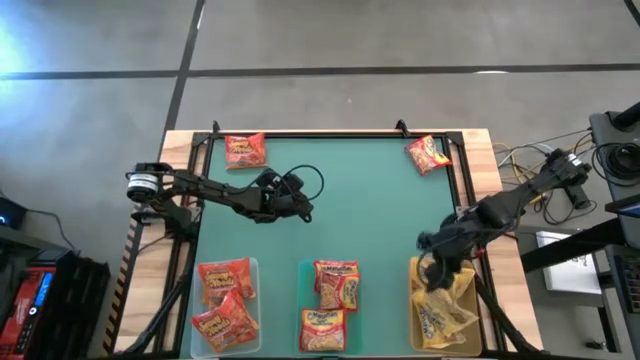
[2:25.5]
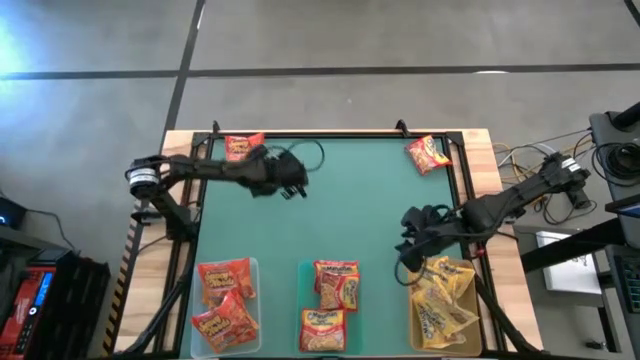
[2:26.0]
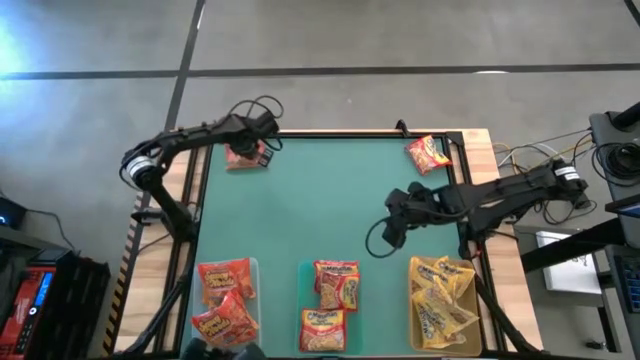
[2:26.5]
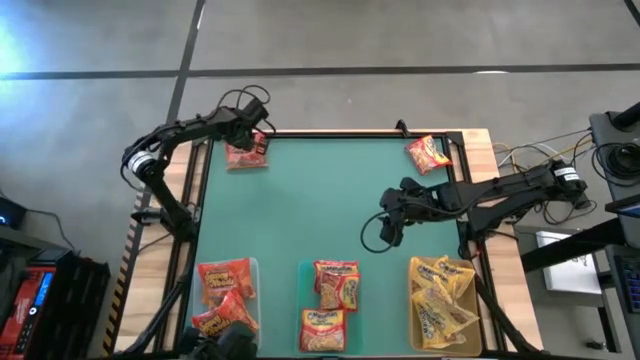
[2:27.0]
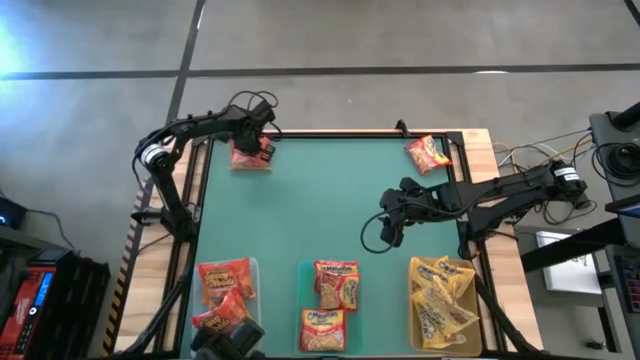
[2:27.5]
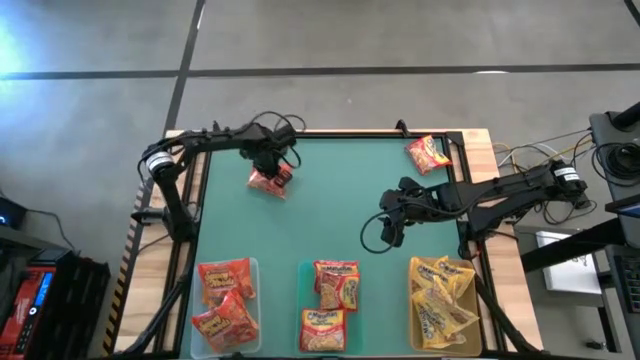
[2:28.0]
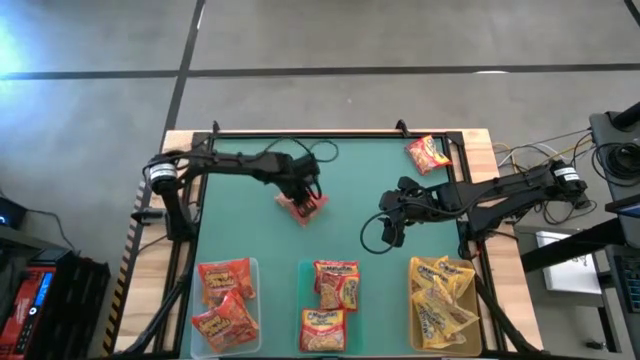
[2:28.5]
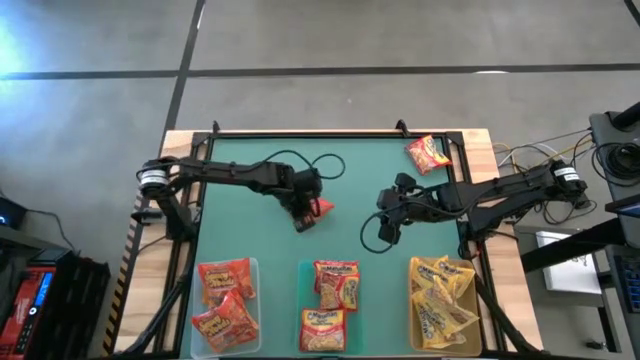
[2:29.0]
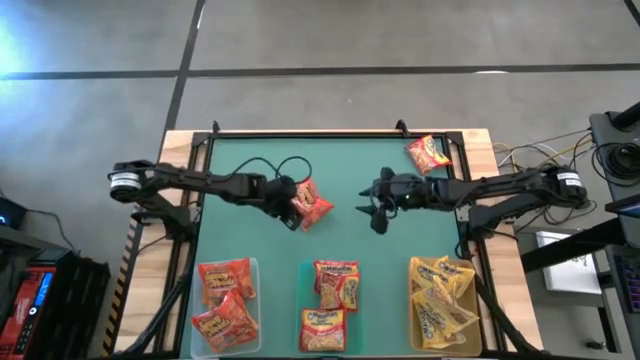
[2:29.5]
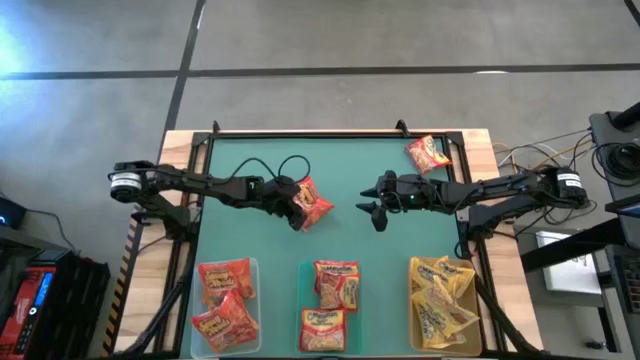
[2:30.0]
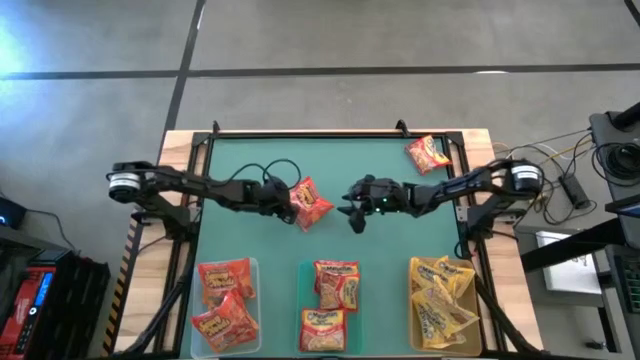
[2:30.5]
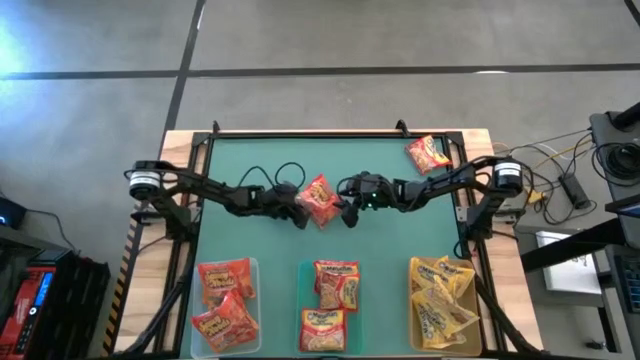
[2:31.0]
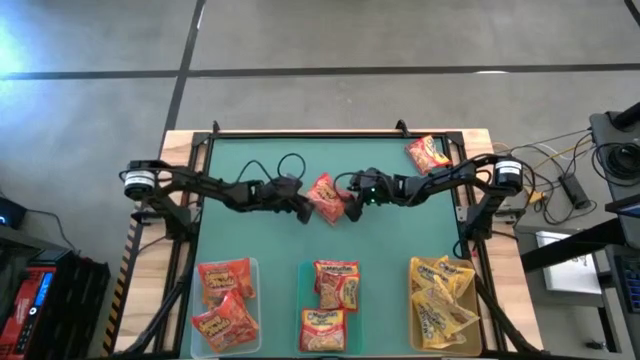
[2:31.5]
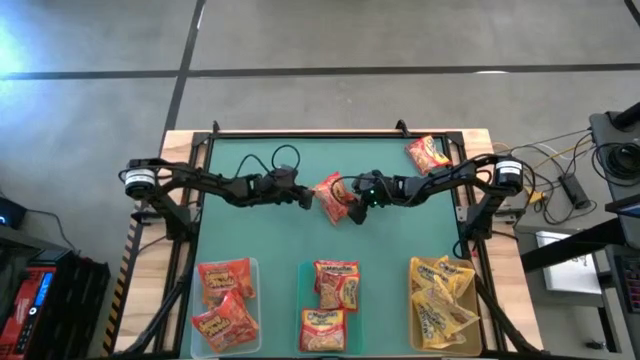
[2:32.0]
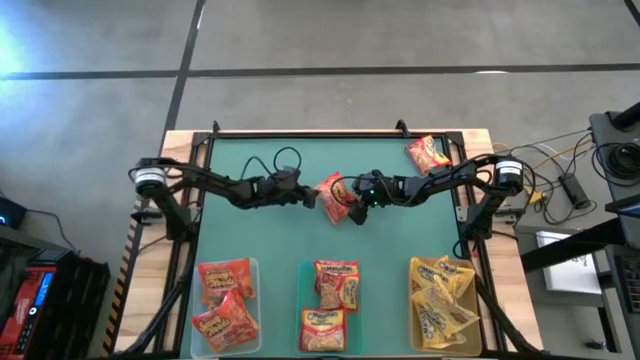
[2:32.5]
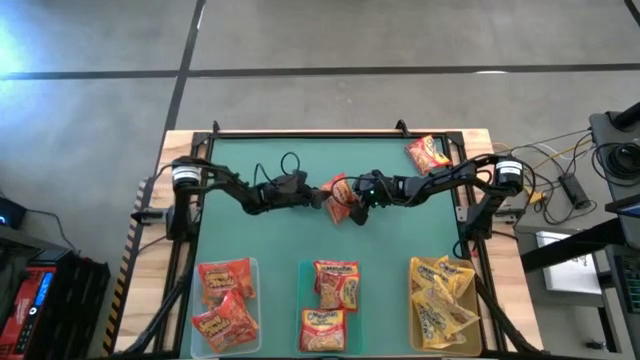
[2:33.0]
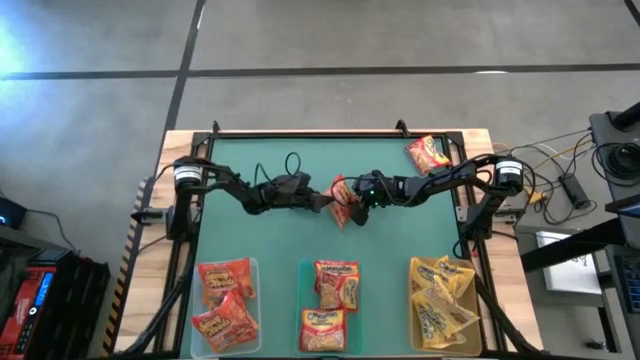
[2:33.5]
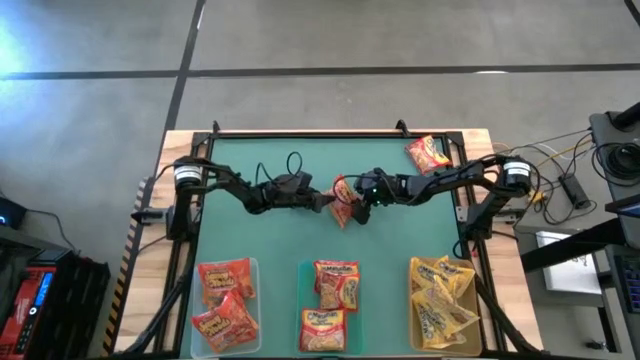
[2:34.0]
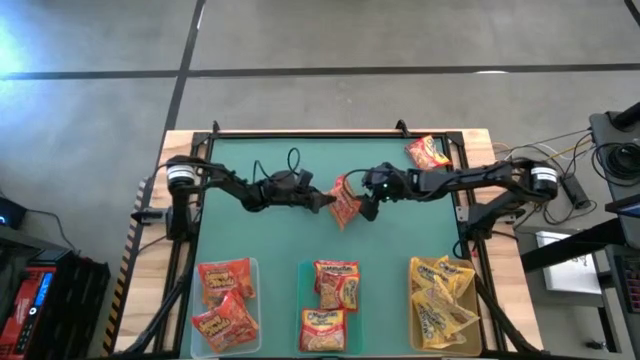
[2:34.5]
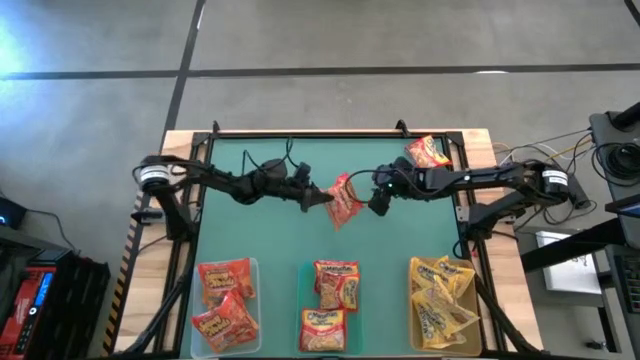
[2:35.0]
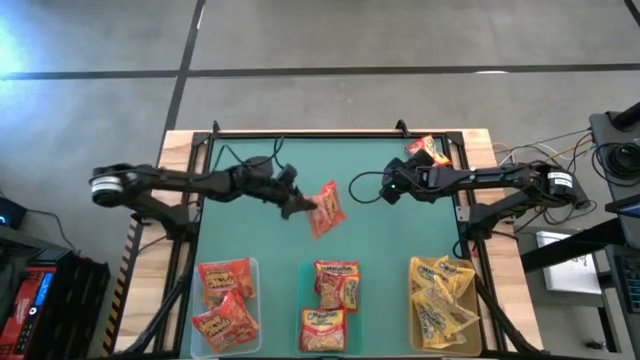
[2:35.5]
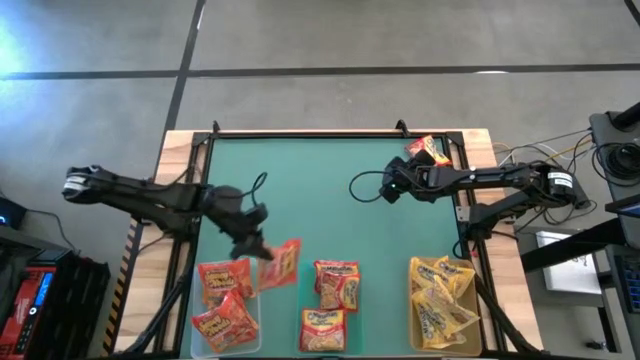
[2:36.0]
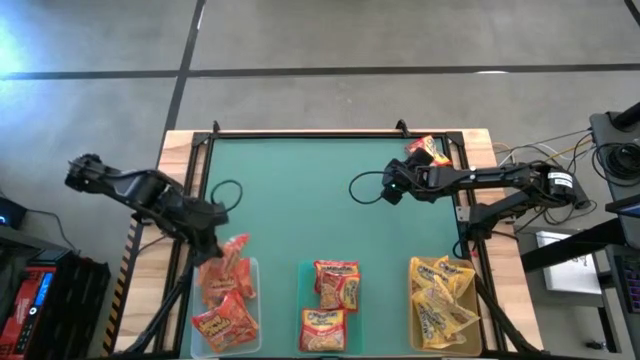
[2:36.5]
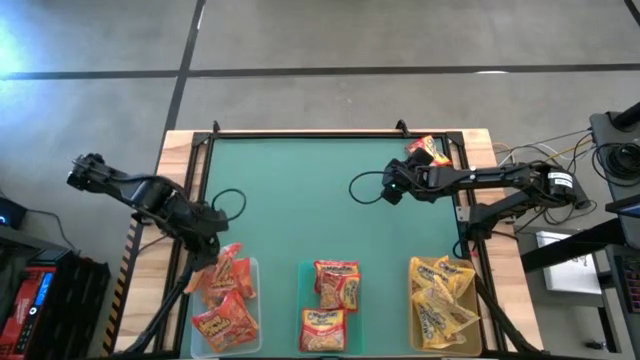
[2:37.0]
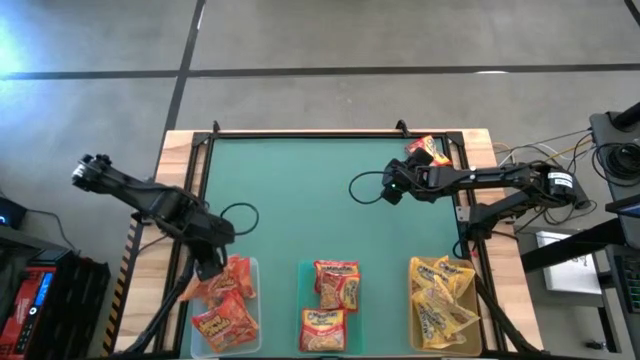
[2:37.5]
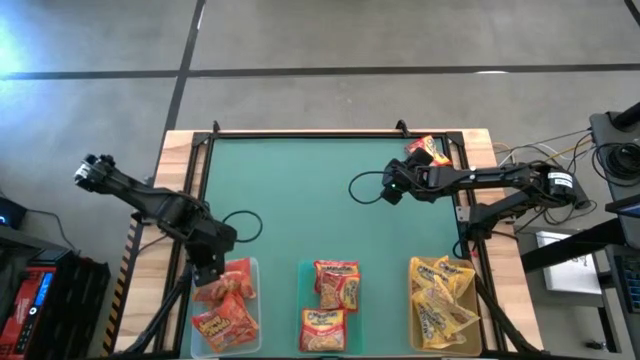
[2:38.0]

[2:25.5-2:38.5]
Task: Sort Maruchan noodles
Put the orange noodle pack into the transparent bin
